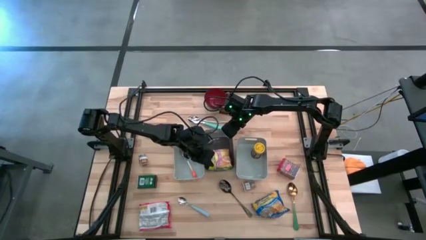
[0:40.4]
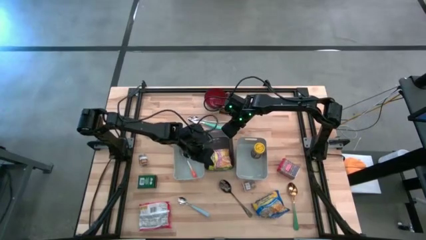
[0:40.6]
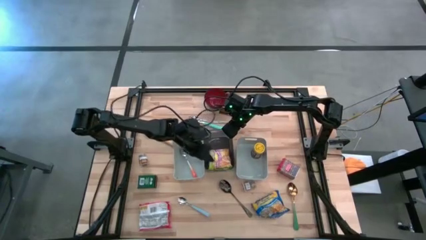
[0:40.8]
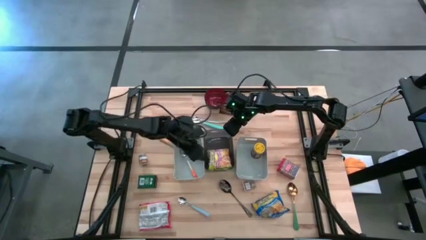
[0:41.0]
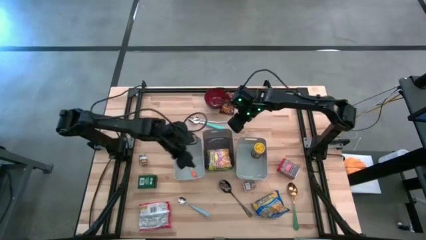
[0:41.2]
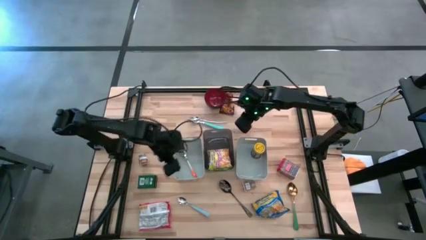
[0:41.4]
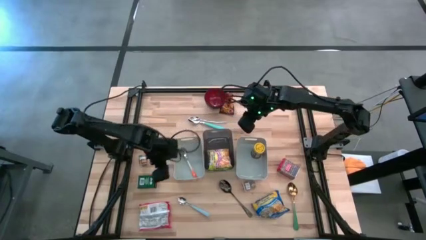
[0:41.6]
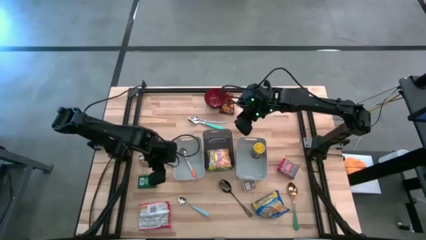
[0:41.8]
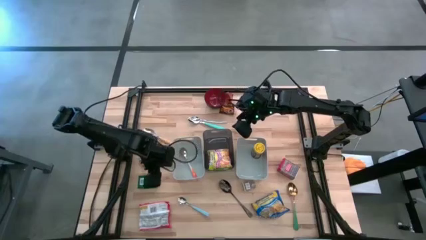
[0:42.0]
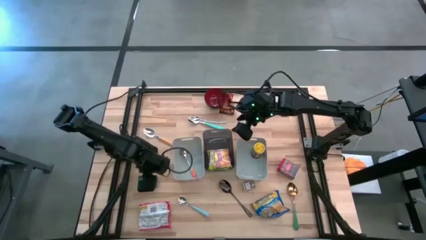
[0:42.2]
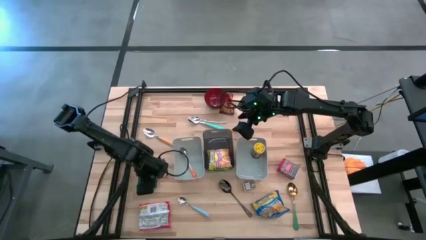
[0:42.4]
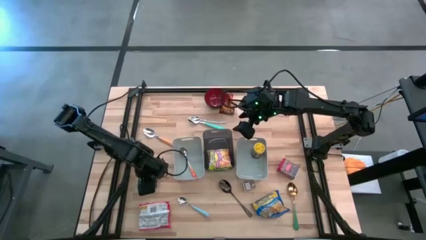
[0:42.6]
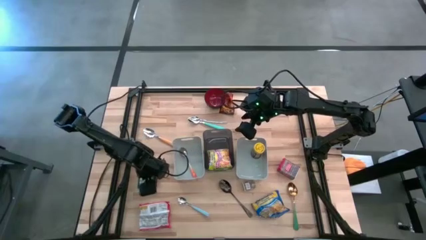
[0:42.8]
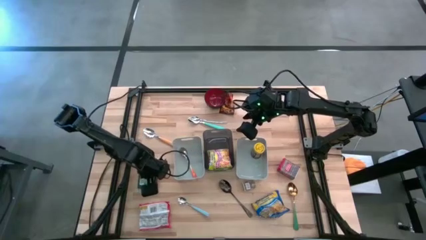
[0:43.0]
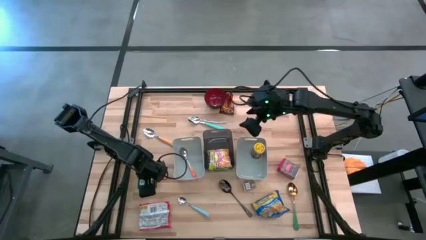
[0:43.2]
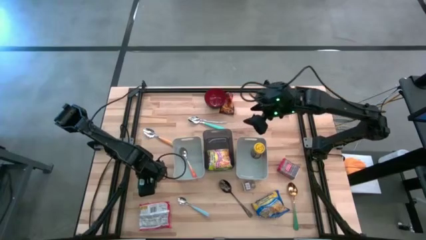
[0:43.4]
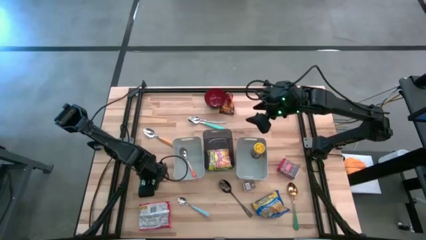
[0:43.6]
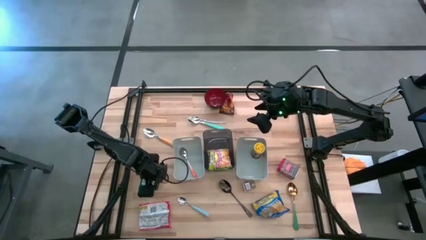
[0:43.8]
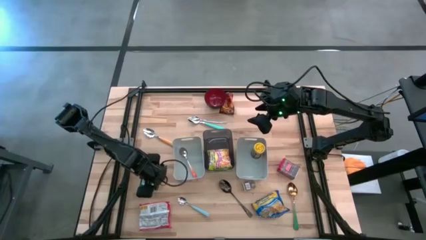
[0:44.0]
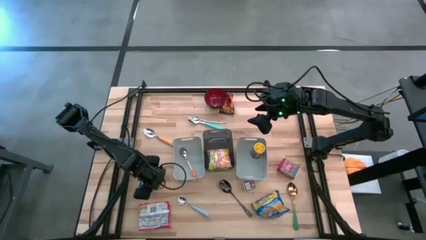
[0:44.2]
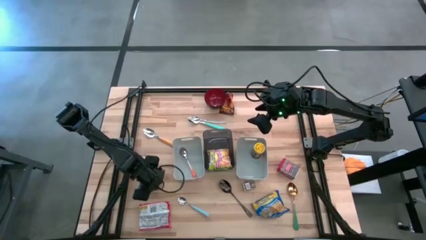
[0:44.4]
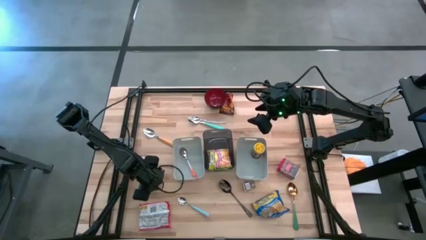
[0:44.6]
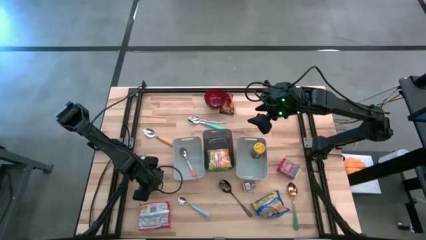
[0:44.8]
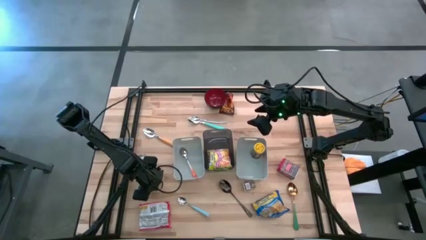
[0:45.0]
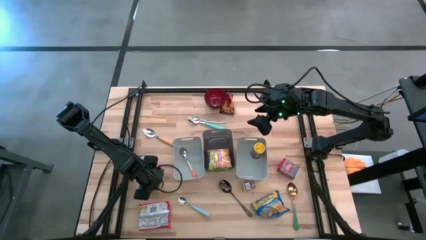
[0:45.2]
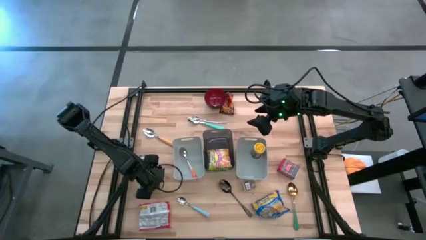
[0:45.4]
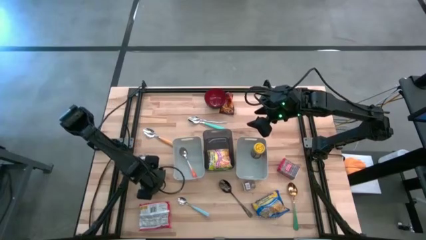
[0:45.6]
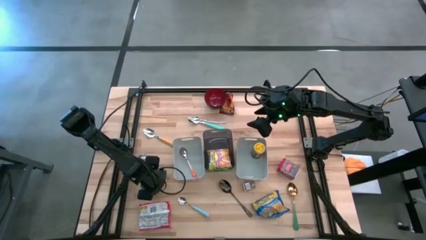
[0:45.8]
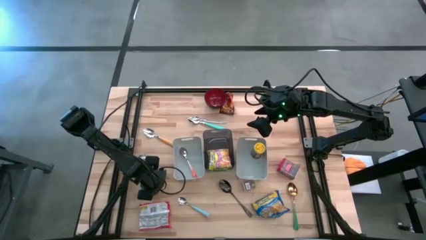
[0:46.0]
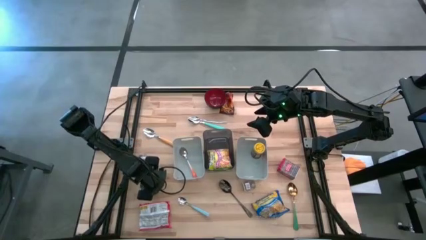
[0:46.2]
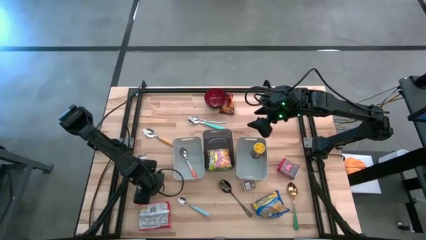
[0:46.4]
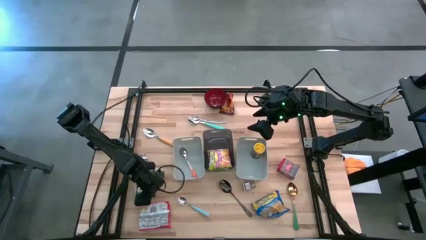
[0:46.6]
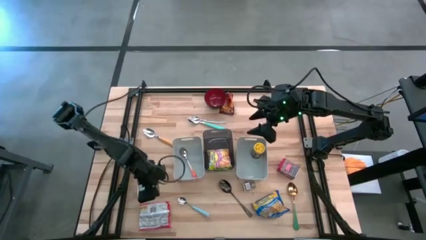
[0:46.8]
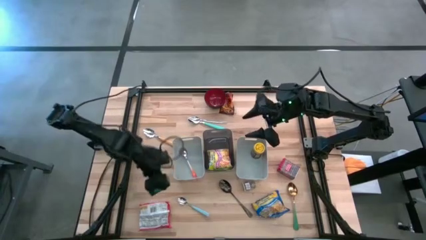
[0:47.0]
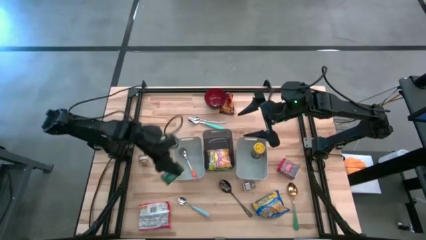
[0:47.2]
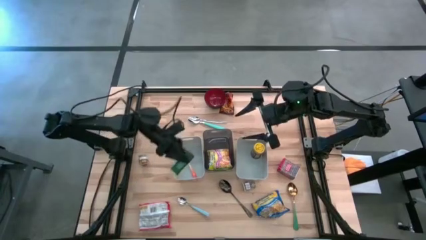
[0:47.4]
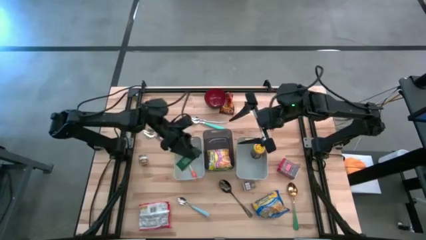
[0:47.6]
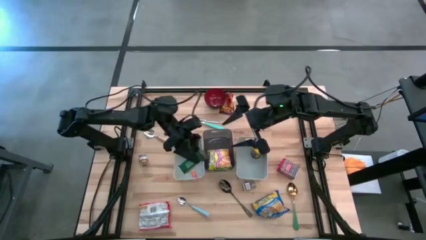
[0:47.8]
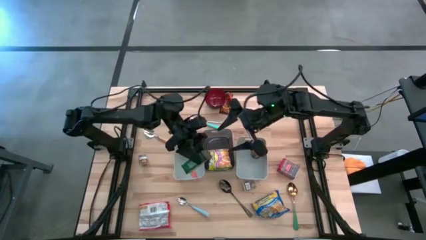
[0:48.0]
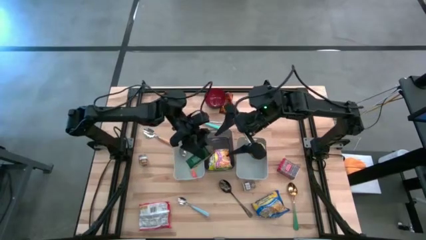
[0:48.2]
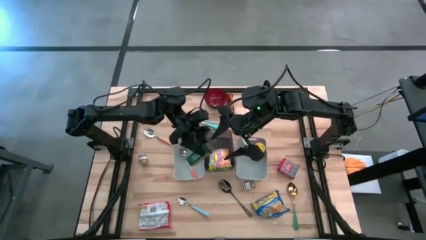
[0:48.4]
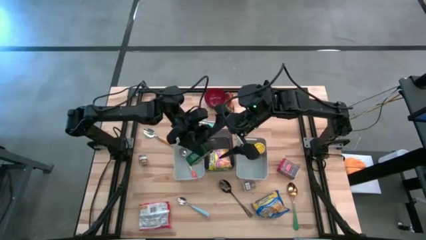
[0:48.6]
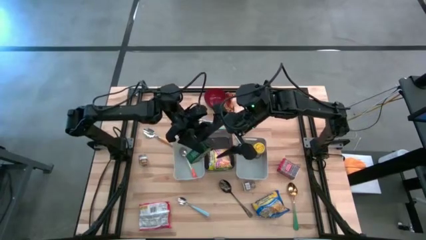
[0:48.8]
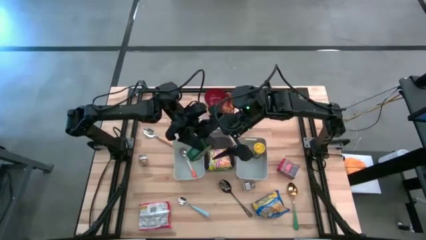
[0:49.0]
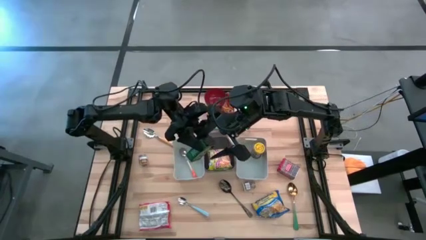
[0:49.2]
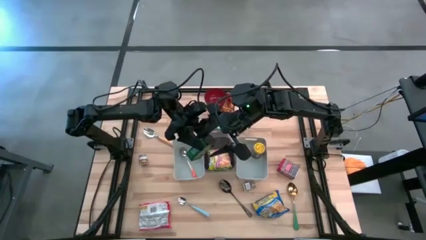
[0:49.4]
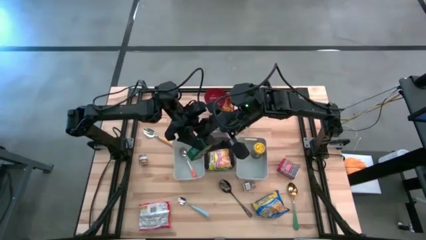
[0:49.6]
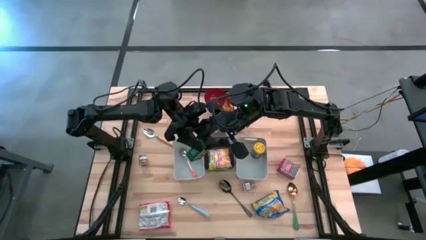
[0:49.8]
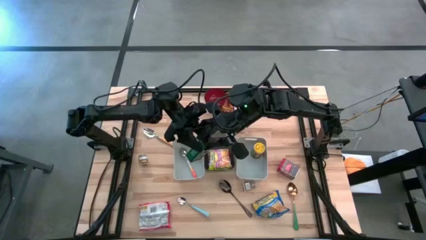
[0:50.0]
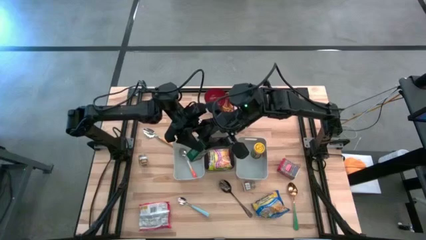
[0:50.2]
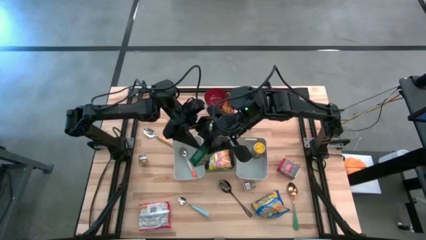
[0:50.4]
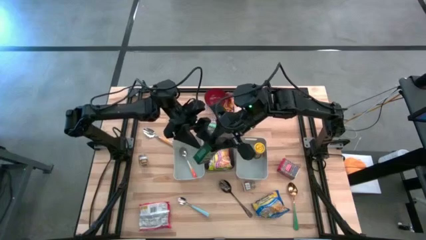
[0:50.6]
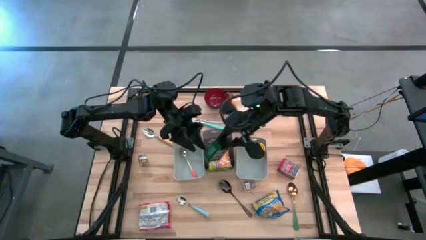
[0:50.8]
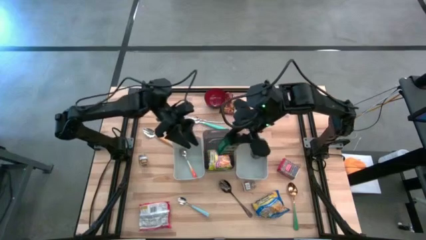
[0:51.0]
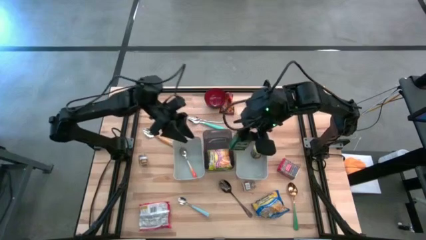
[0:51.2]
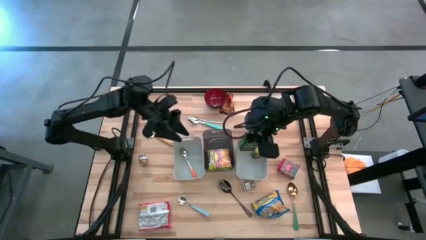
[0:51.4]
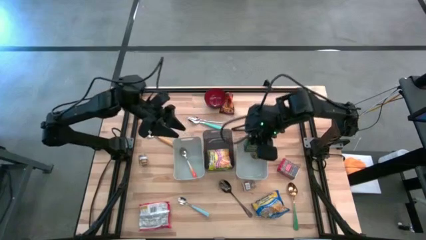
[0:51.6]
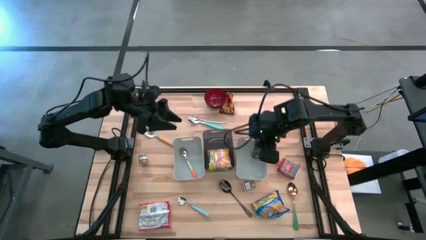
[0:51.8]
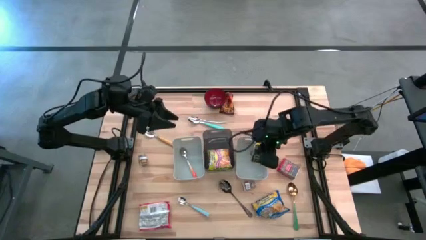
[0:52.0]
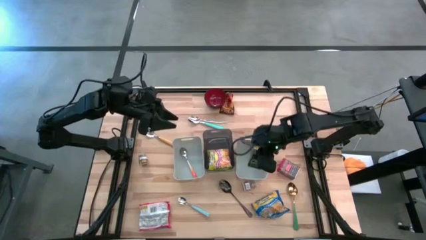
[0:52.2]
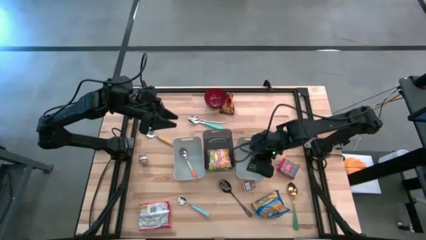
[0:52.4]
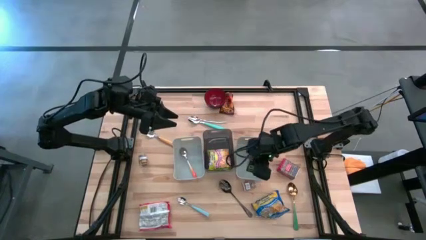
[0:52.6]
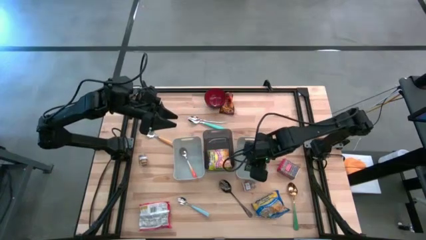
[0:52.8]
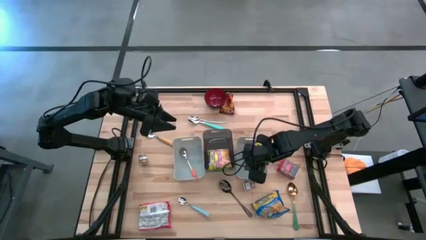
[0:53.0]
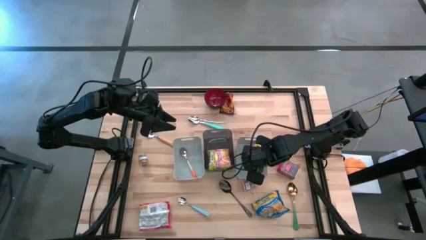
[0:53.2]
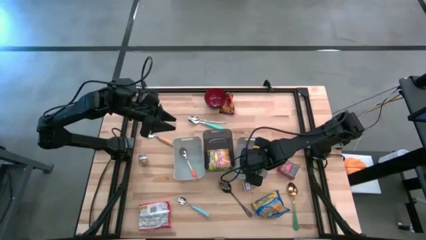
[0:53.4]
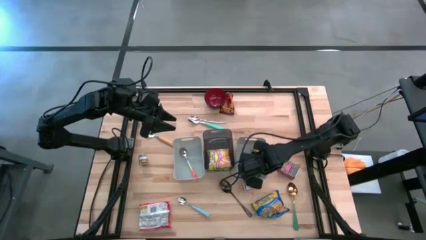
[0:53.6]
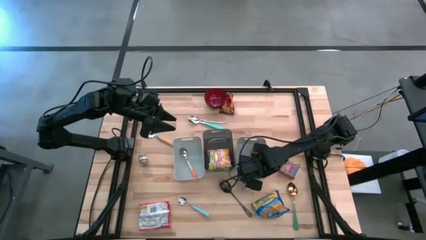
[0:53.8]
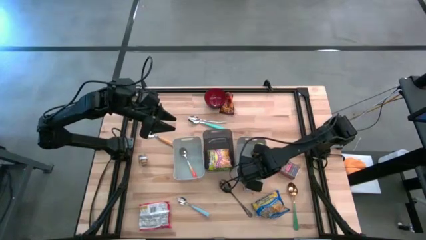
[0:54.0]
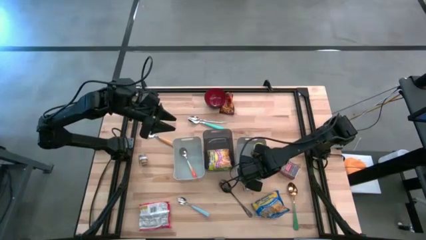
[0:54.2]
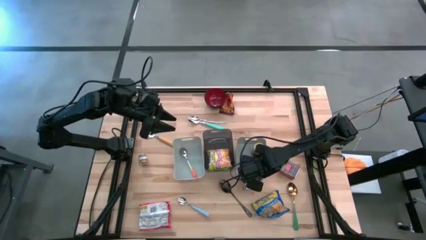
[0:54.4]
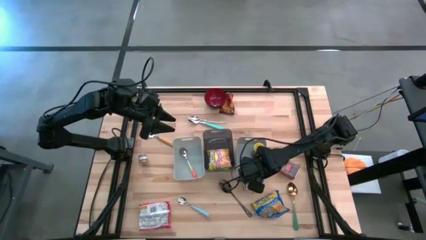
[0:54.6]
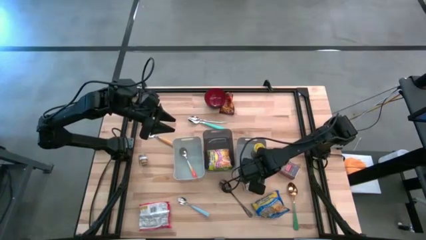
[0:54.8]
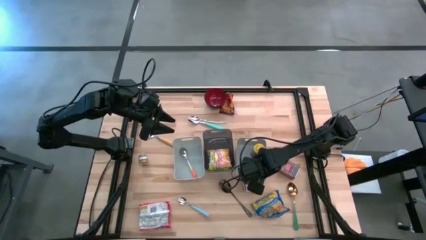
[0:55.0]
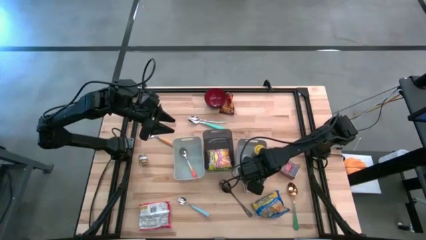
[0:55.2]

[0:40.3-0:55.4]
Put the black seasoning can into the right gray bin
